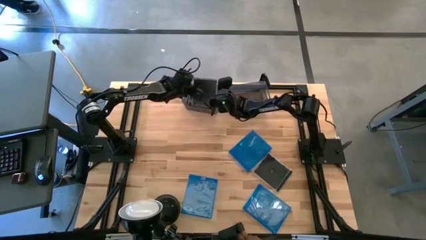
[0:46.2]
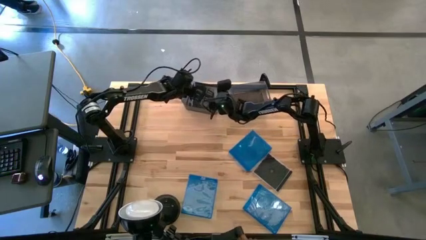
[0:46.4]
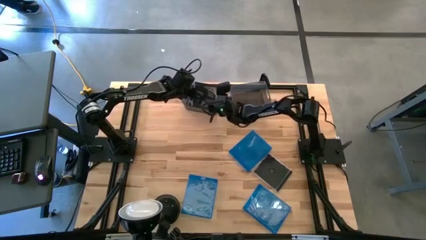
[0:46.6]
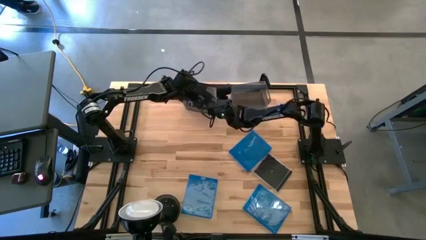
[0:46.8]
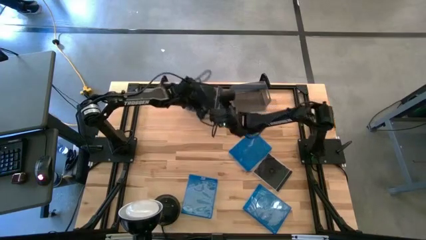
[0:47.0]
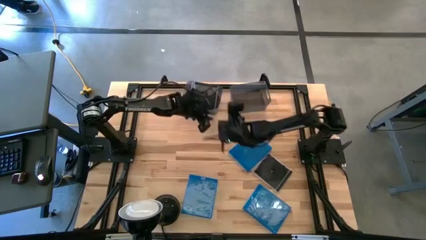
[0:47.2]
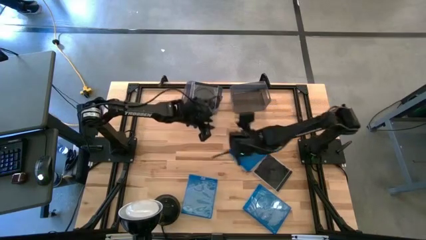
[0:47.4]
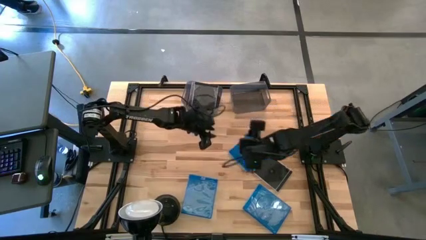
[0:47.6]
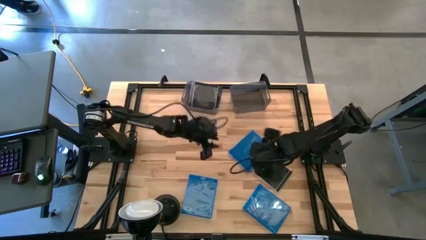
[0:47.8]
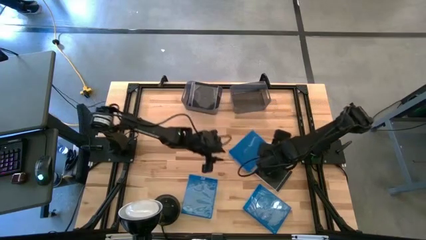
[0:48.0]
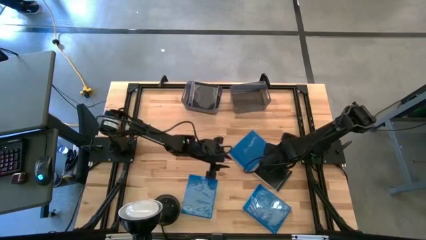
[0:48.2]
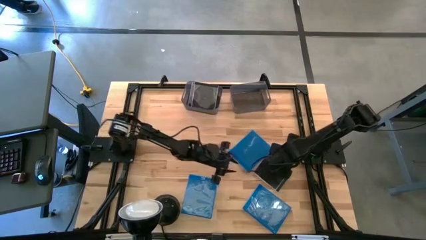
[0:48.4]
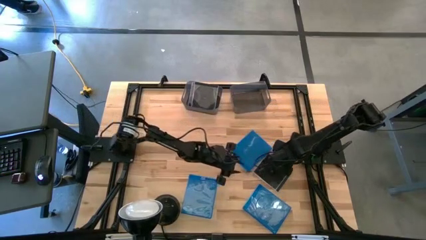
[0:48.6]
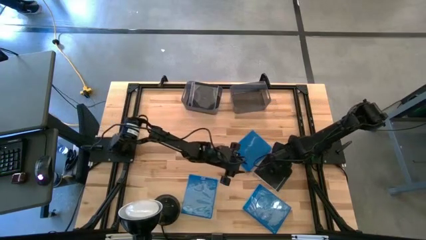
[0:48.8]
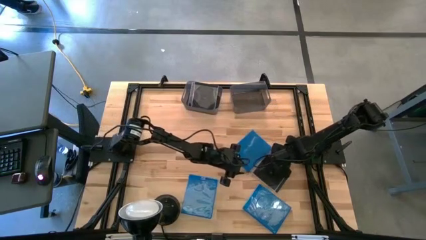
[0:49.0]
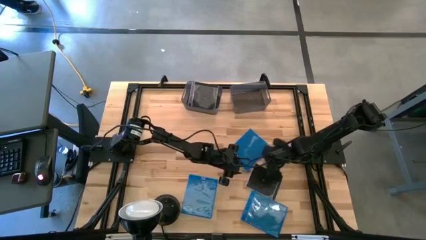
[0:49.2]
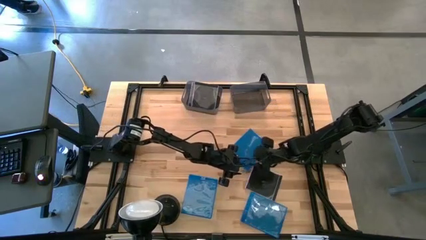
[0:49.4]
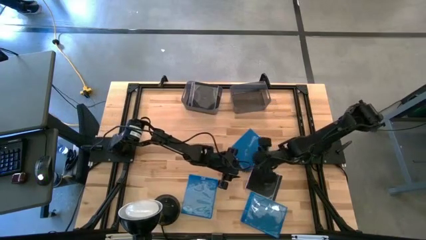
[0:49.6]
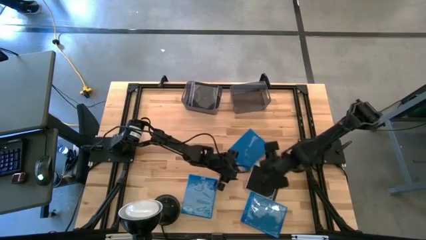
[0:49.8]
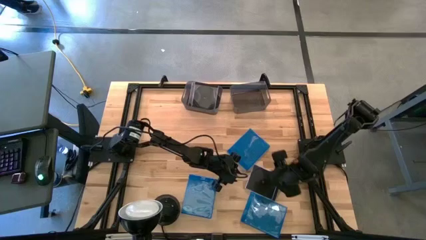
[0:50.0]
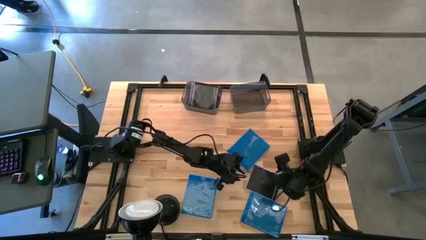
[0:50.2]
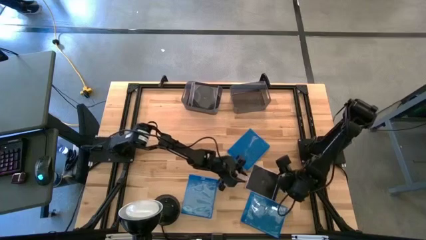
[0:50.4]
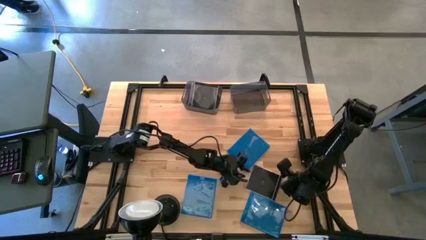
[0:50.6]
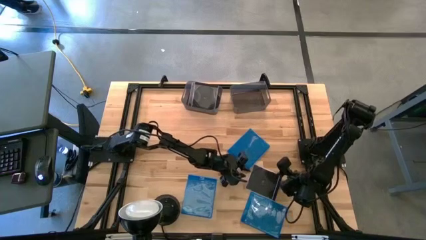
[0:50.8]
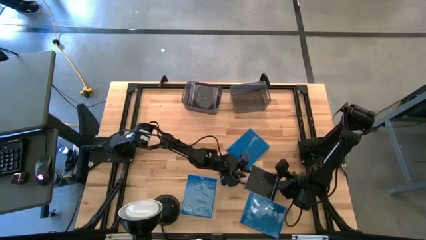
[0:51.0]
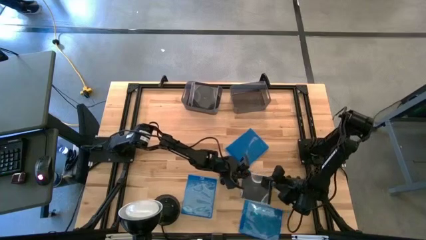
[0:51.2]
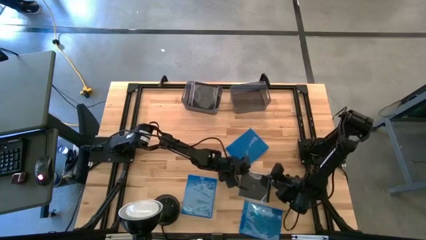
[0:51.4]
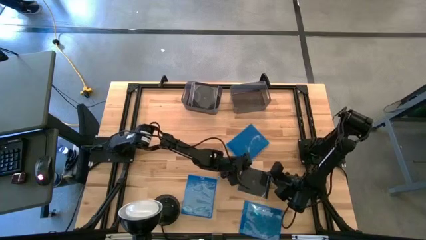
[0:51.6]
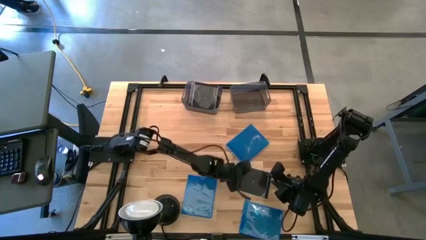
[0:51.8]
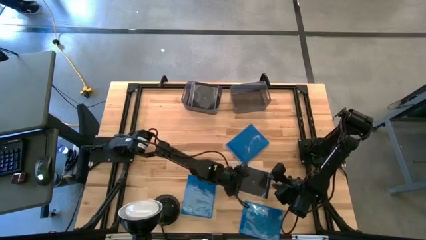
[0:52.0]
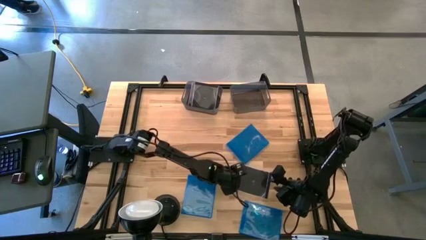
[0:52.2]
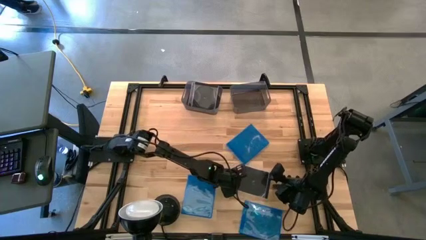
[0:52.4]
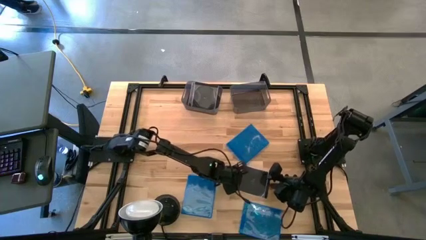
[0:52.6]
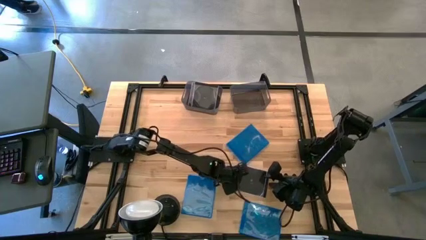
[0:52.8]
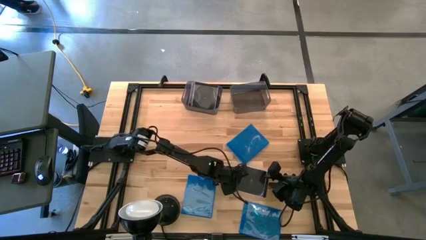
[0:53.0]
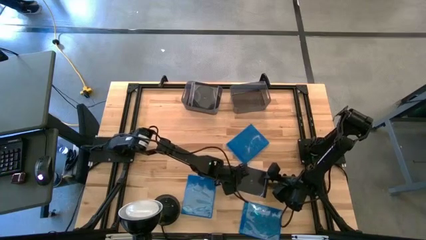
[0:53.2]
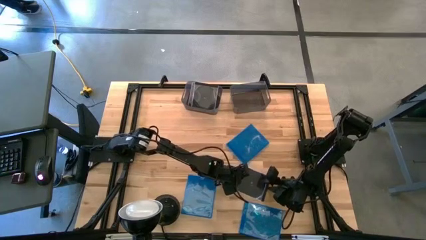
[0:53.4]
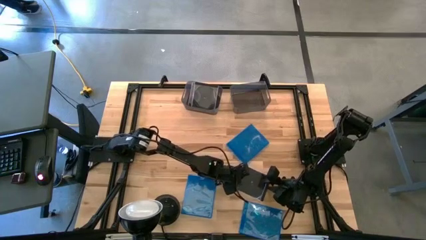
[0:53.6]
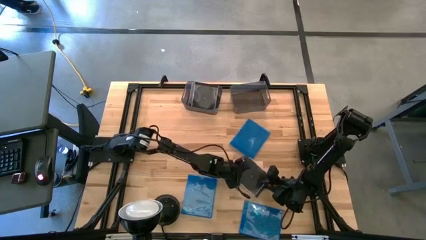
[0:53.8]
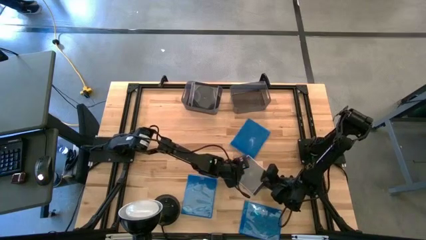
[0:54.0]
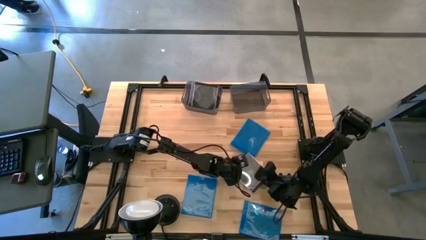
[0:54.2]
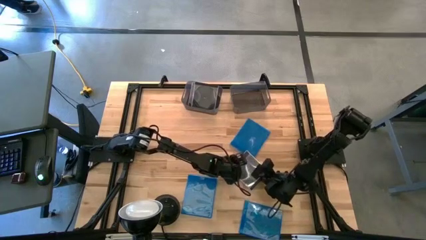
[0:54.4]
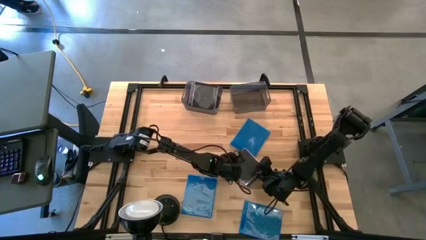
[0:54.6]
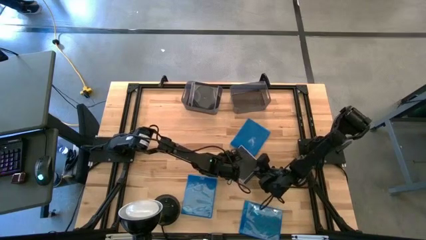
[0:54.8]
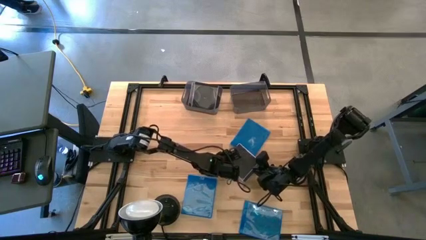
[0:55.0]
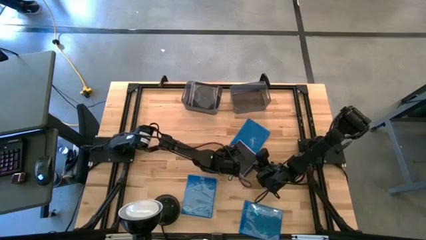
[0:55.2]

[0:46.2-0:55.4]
Task: Pick & place jewel cases by type
Put the black cd case into the left black bin

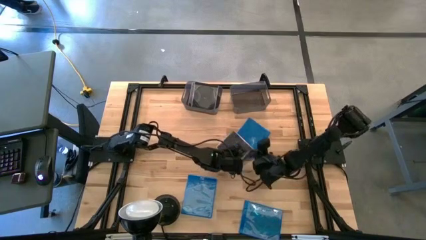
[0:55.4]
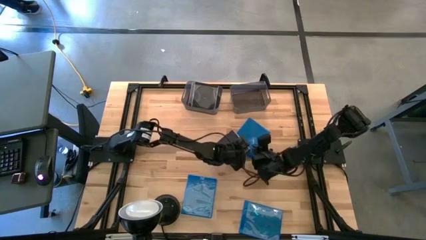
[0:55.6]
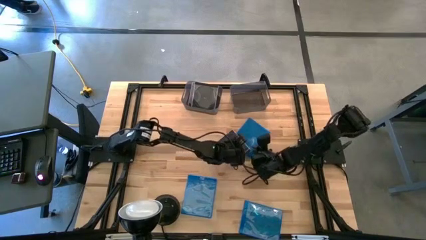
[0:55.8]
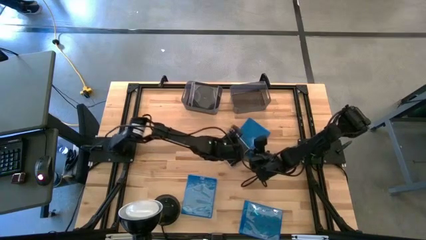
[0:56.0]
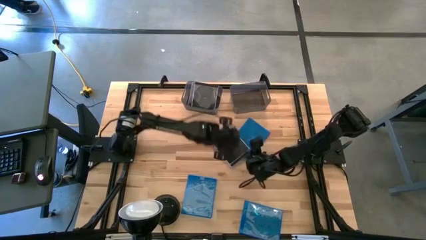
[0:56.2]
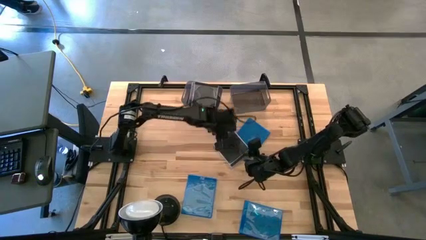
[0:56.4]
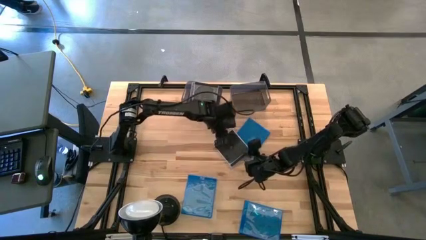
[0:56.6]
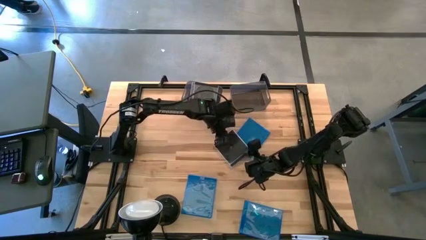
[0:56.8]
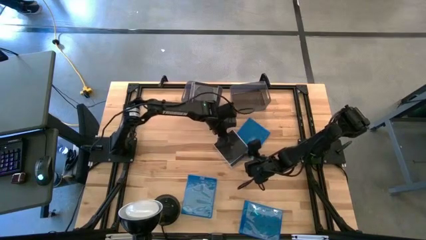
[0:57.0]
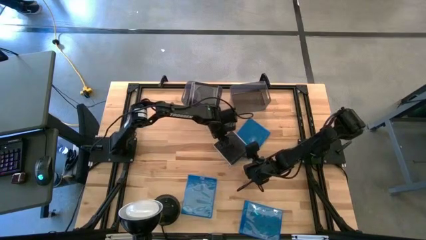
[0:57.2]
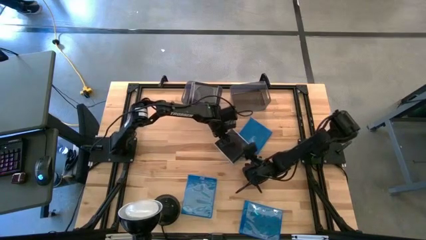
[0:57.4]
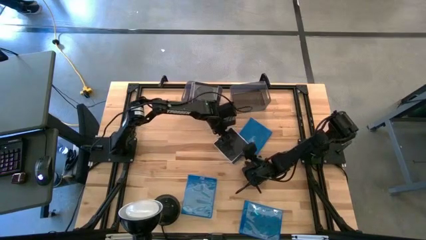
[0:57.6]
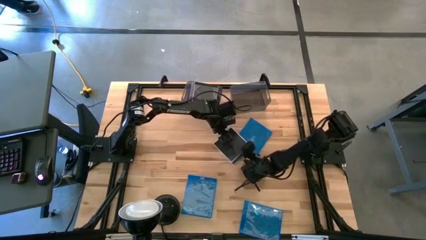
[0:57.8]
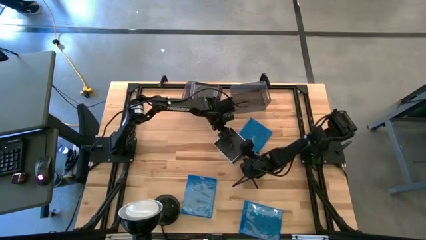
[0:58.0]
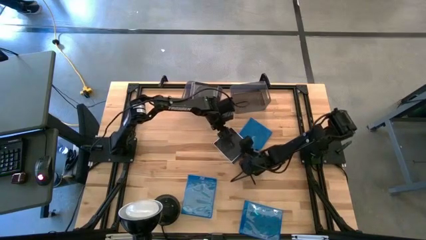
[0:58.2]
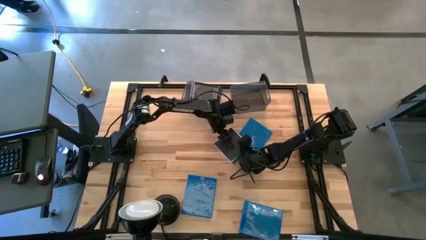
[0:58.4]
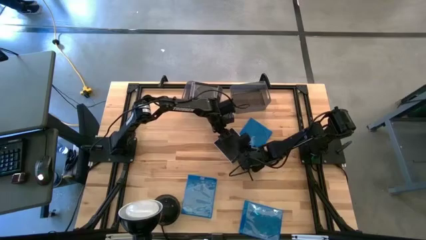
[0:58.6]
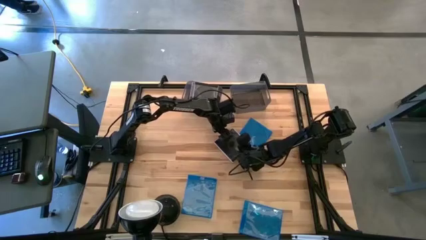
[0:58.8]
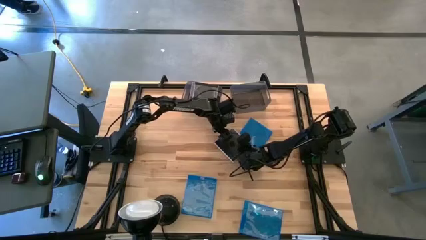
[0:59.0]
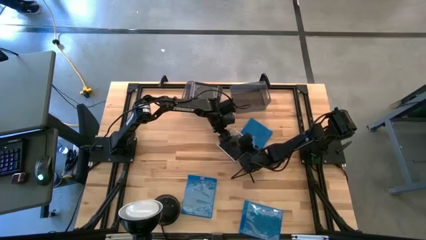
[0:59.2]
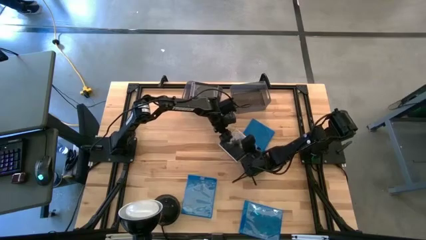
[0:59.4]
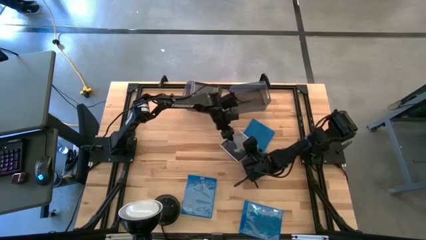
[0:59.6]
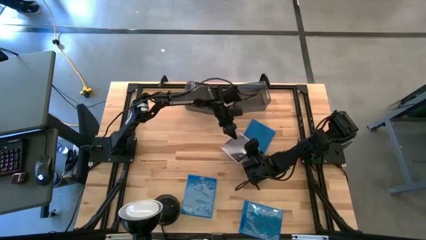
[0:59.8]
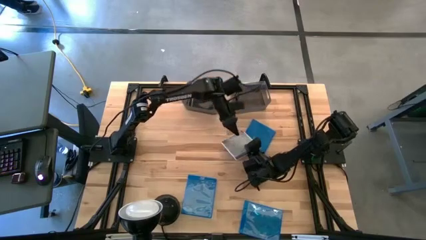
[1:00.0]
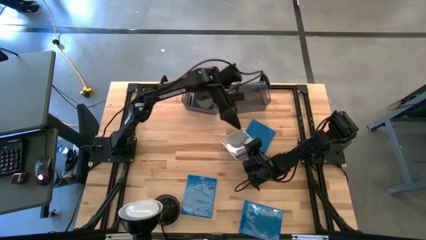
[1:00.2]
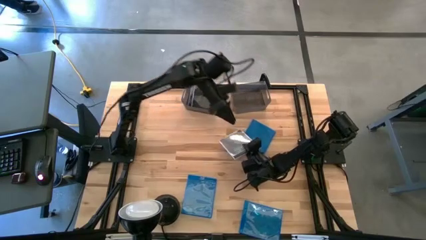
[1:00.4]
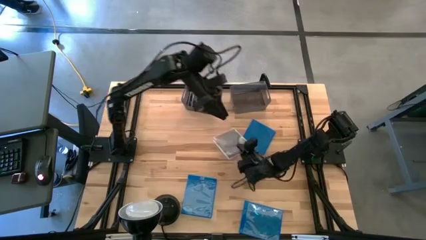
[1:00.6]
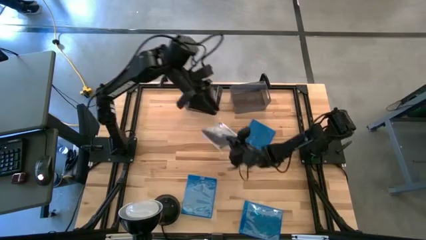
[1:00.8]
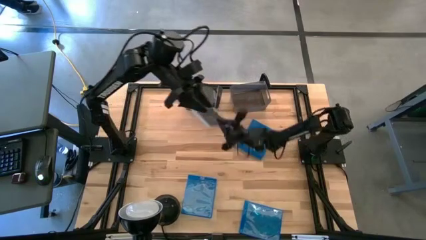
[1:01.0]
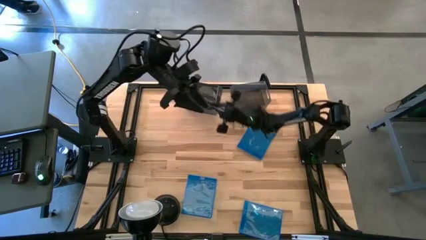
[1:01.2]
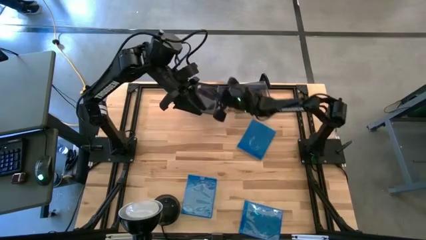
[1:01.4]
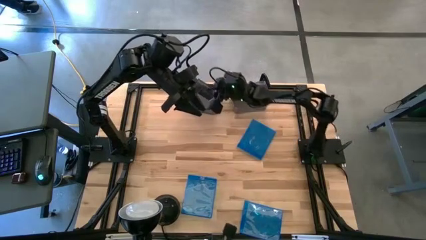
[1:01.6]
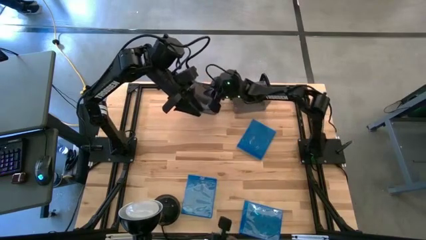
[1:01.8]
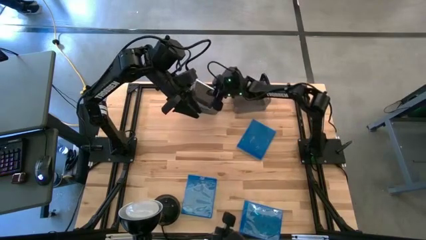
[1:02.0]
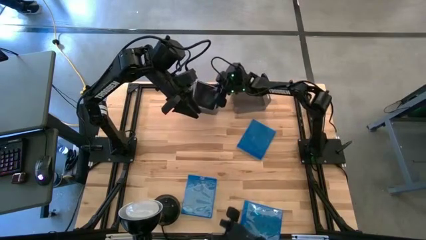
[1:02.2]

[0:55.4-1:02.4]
Put the black cd case into the left black bin
